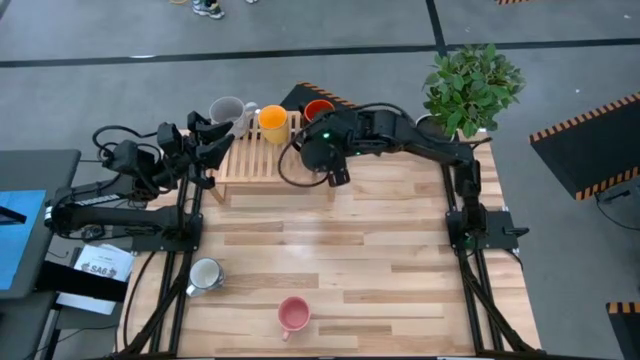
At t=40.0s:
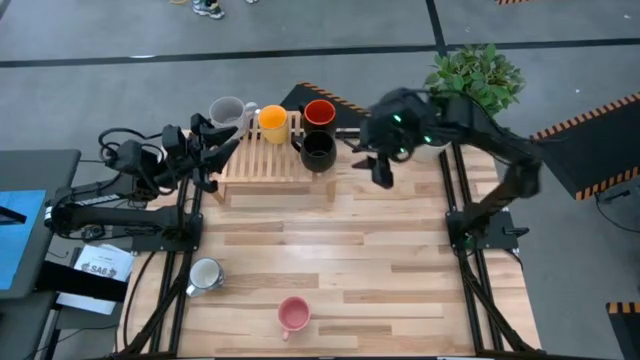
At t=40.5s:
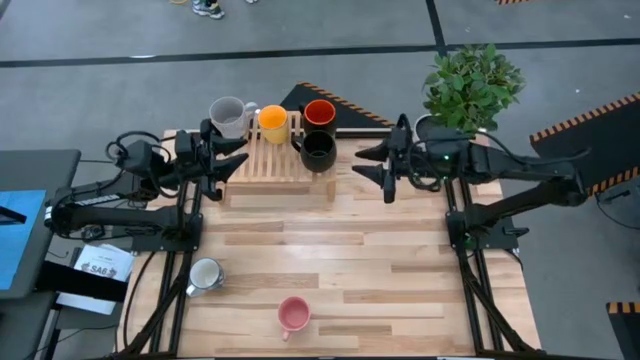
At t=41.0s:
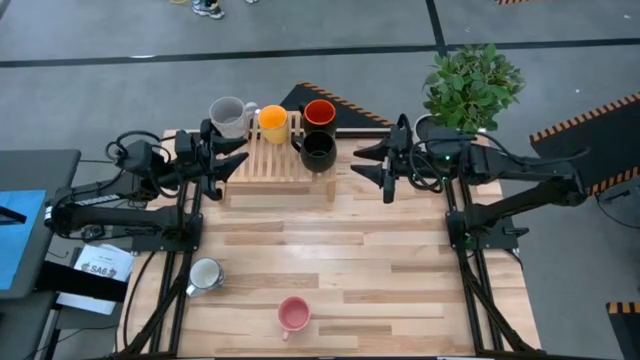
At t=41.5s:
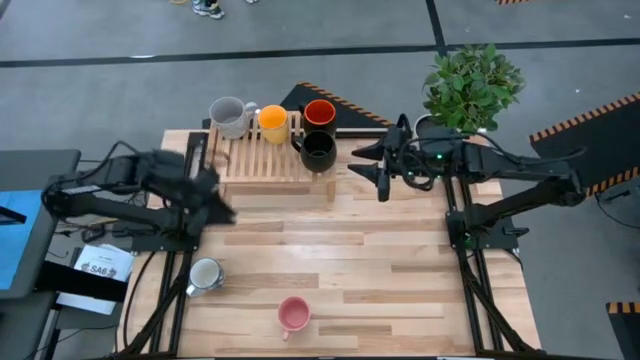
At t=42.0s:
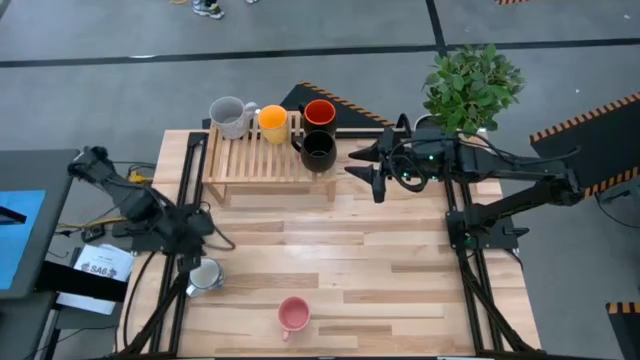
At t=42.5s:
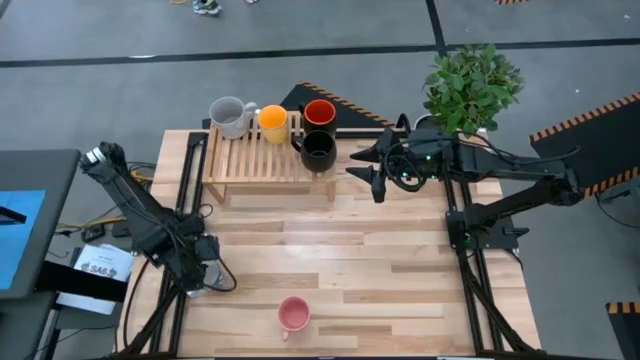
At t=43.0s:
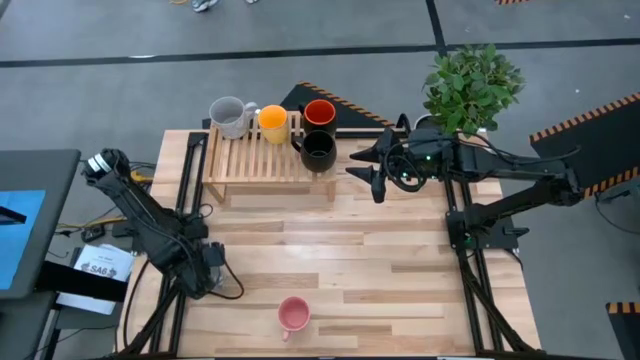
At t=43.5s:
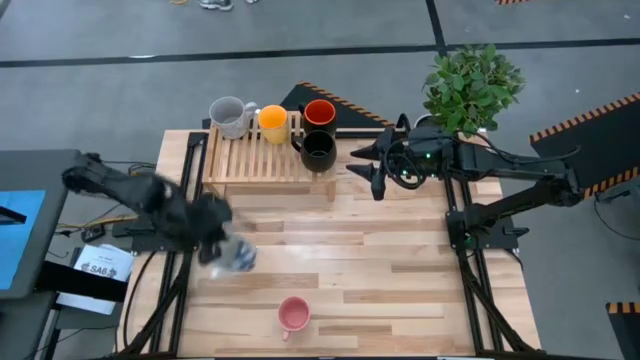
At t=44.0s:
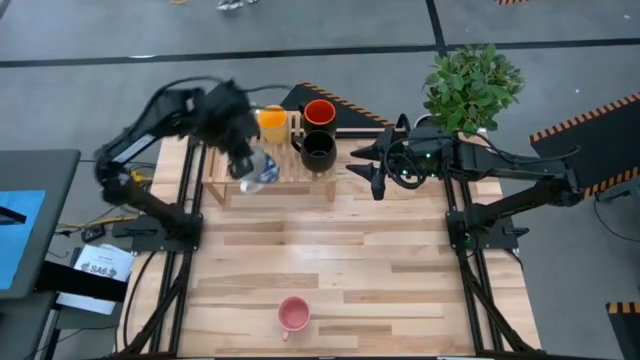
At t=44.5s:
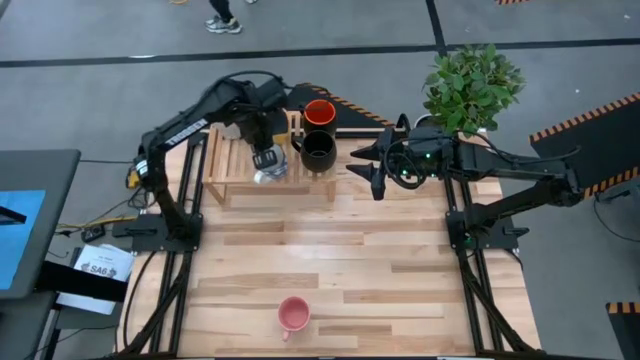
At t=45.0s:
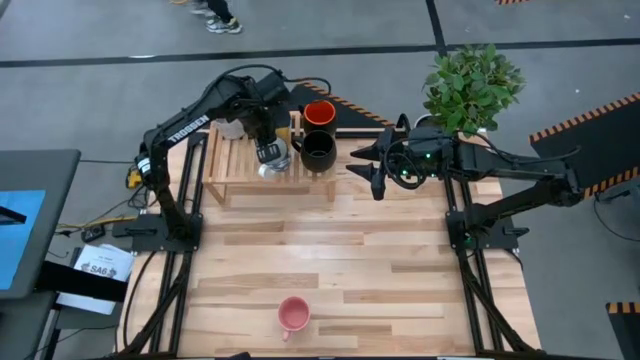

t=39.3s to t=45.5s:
Task: Place coffee mugs
Put the white mug on the shelf

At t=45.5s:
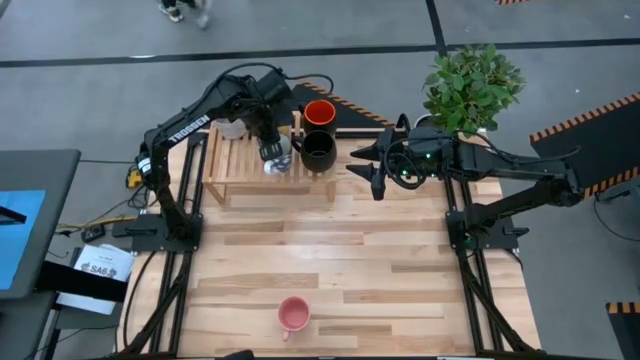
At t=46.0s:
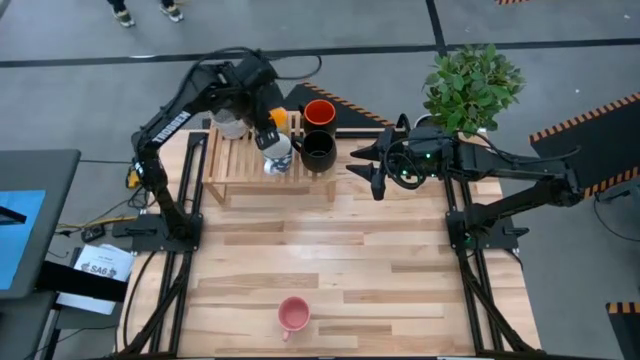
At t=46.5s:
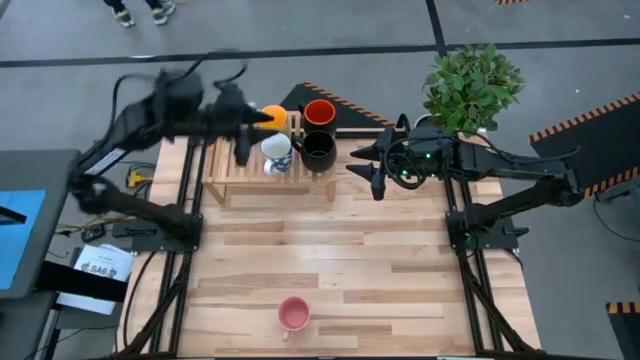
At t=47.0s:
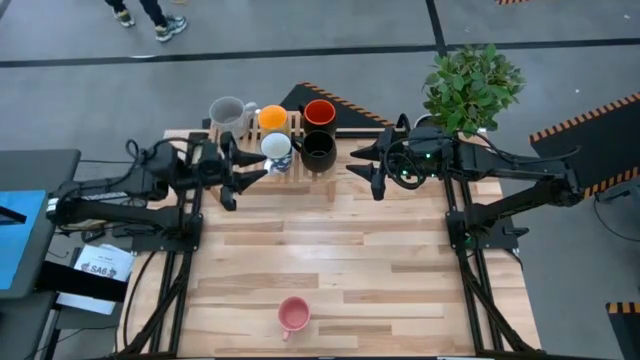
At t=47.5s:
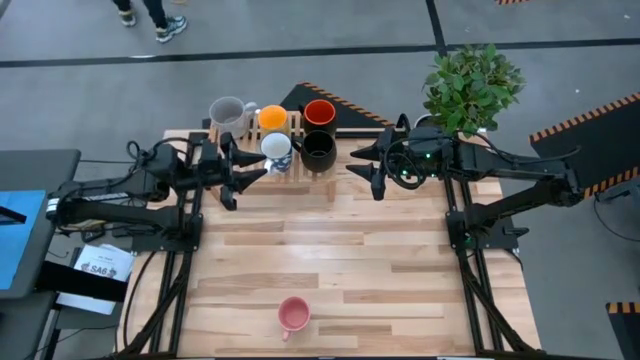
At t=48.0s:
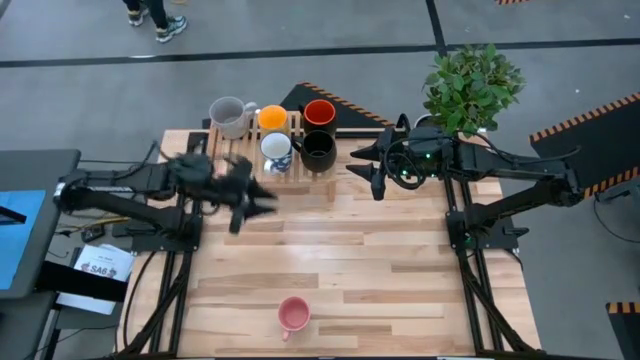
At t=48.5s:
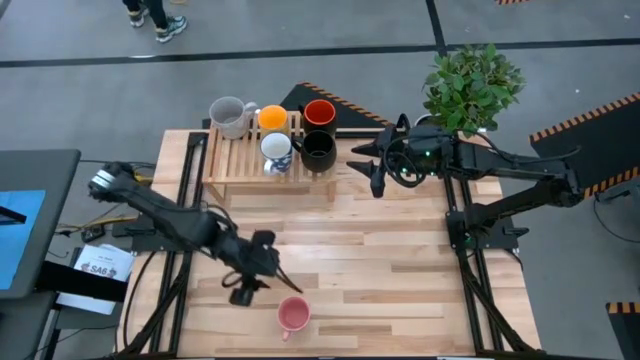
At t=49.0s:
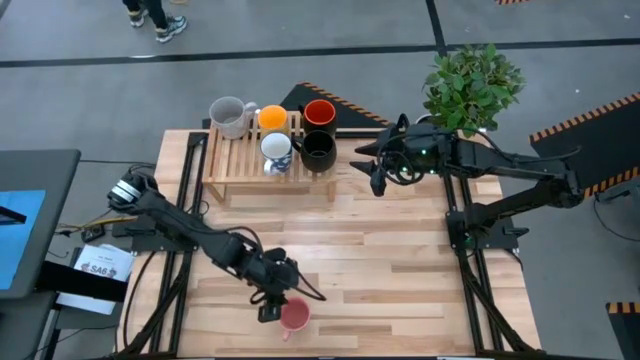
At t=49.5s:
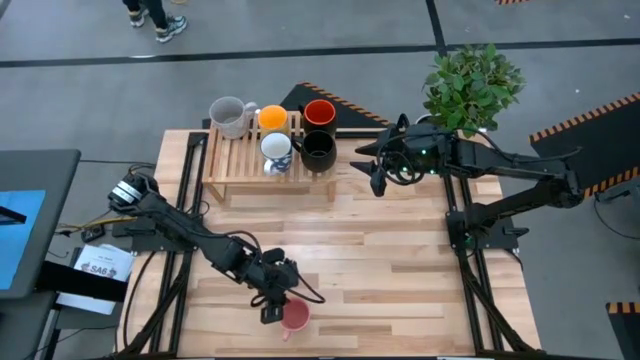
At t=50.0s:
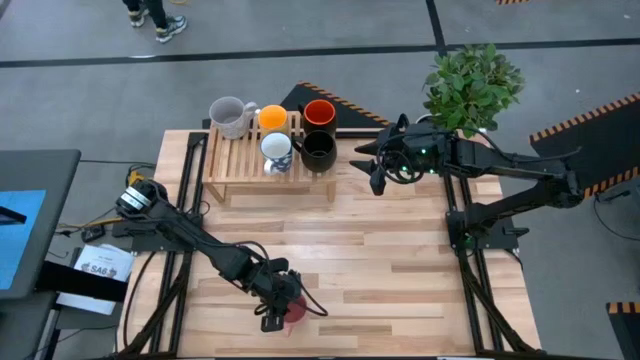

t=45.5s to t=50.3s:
Put the pink mug on the shelf

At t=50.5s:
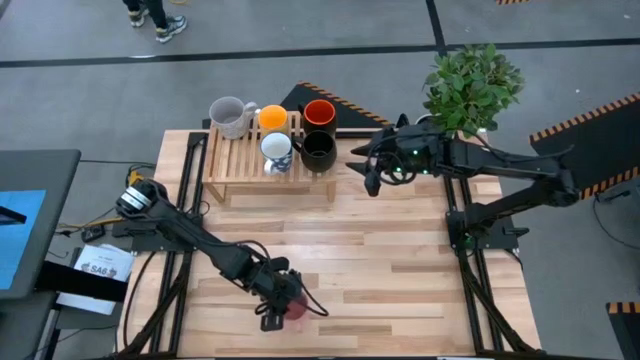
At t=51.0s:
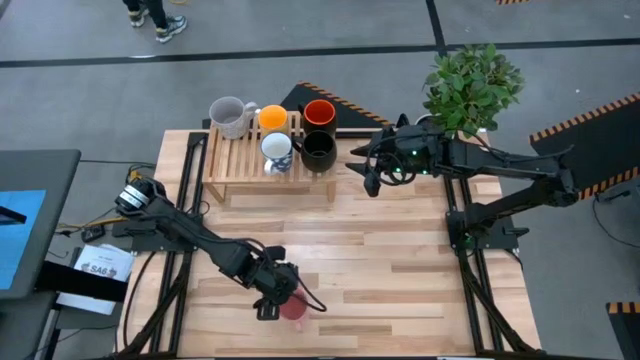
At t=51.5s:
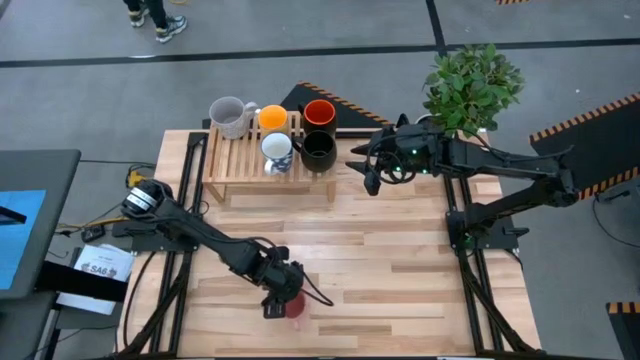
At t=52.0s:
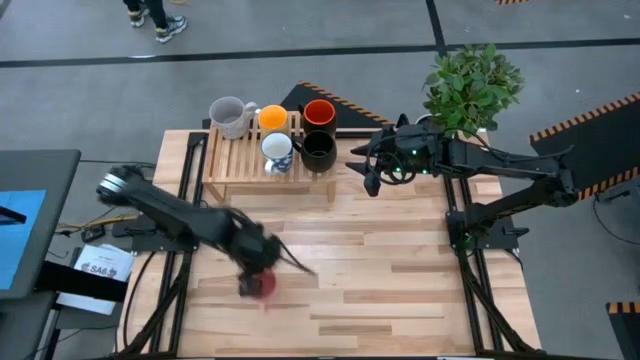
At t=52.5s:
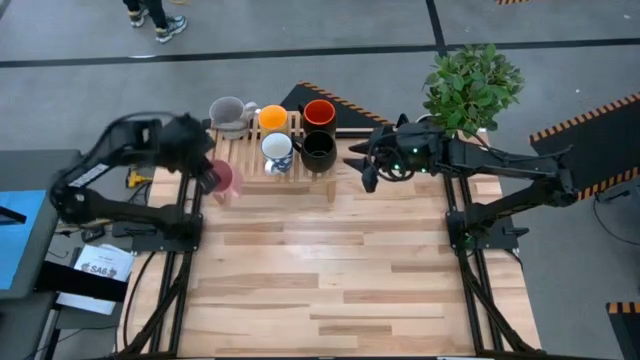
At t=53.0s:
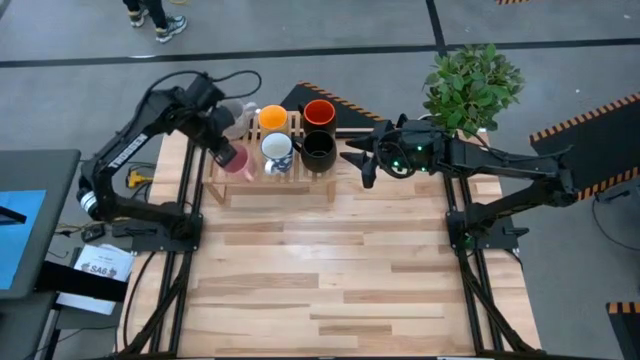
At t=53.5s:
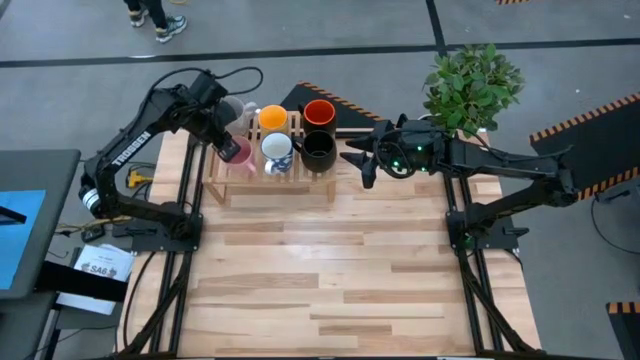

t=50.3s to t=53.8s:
Put the pink mug on the shelf

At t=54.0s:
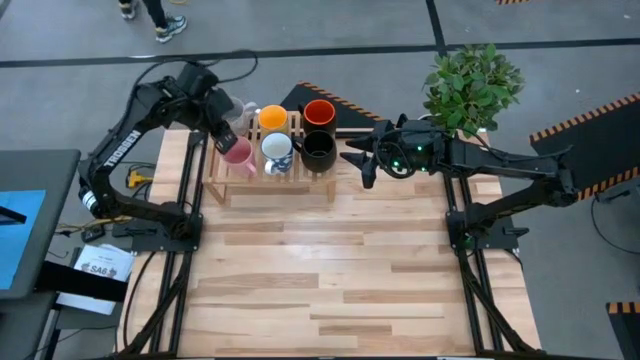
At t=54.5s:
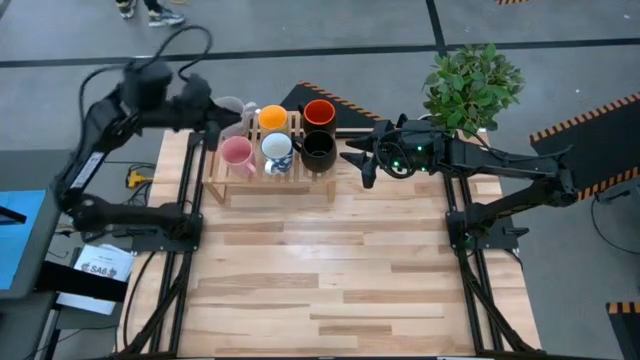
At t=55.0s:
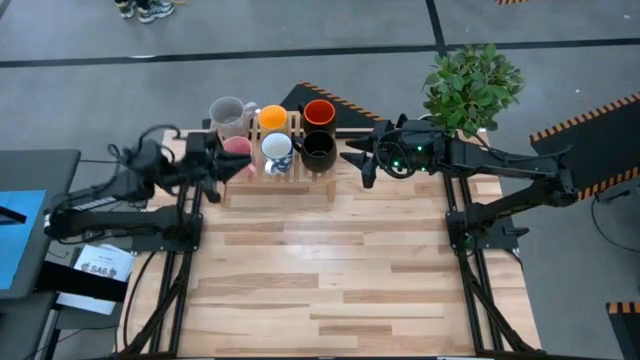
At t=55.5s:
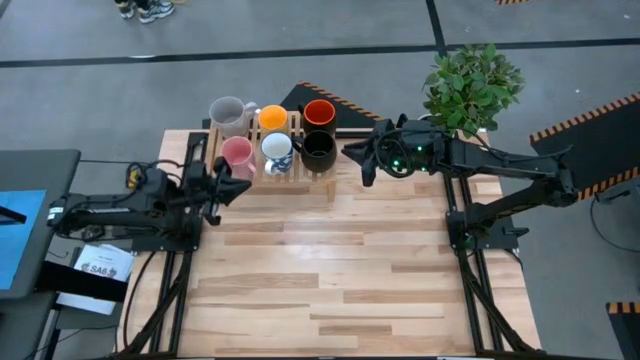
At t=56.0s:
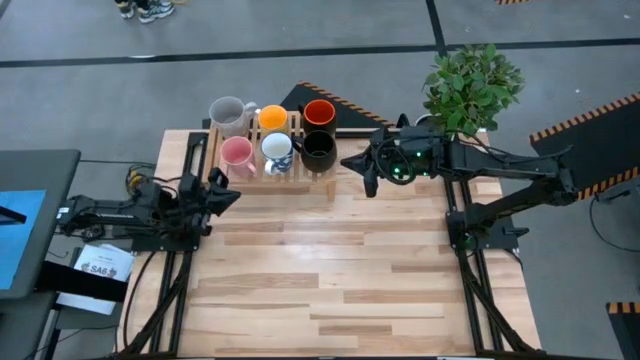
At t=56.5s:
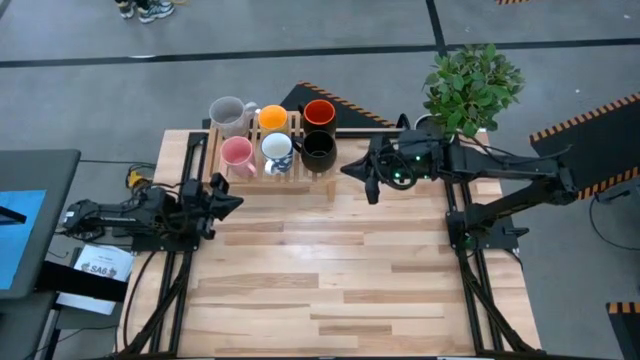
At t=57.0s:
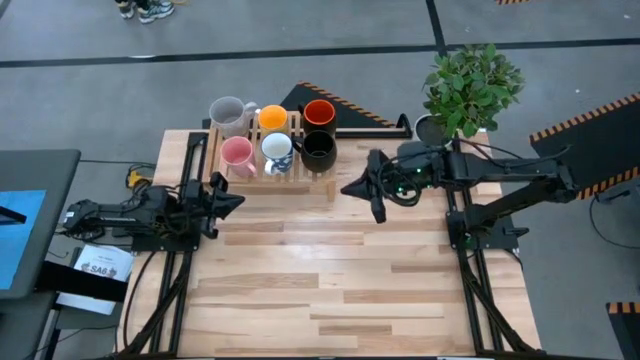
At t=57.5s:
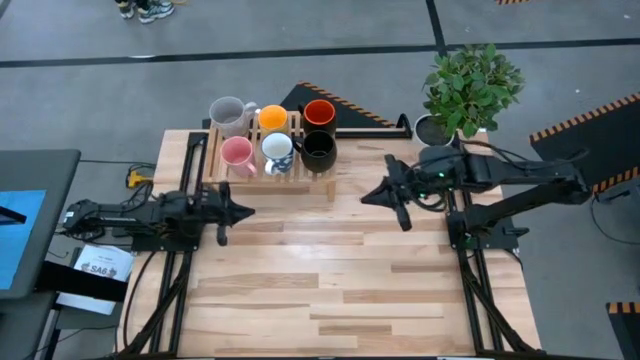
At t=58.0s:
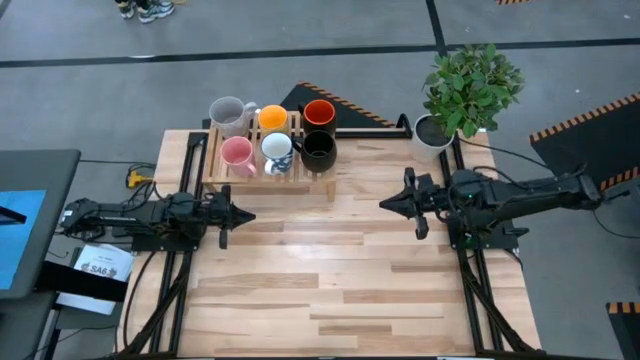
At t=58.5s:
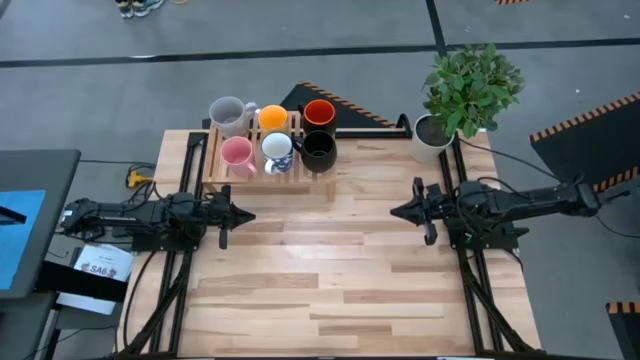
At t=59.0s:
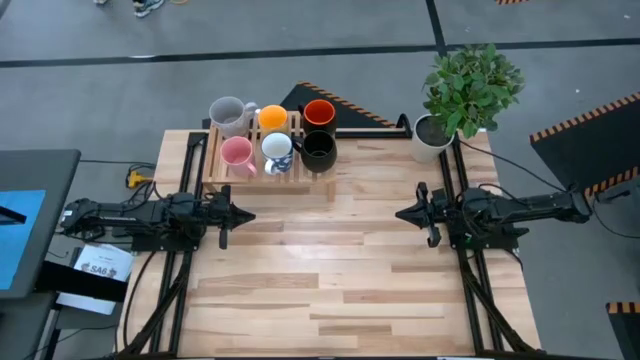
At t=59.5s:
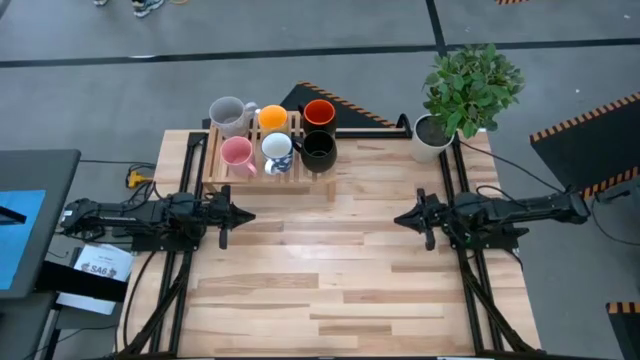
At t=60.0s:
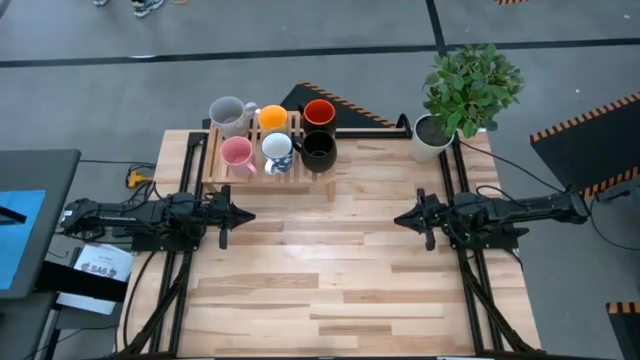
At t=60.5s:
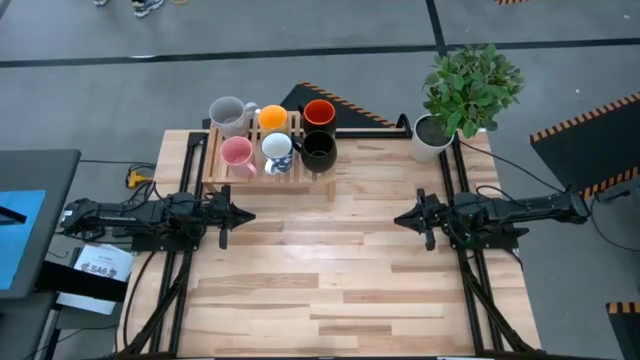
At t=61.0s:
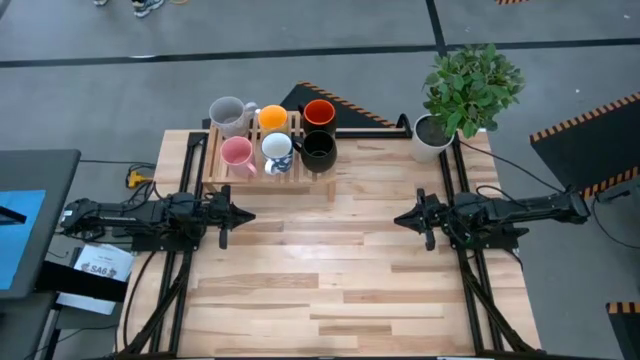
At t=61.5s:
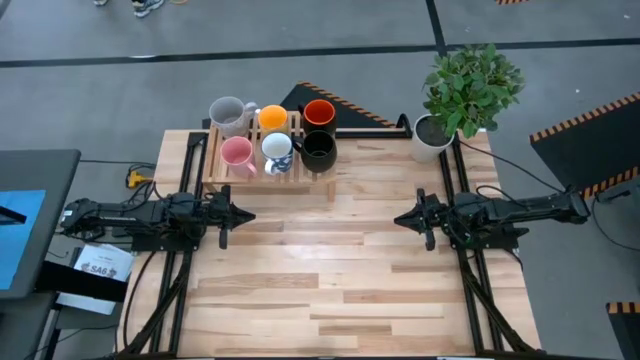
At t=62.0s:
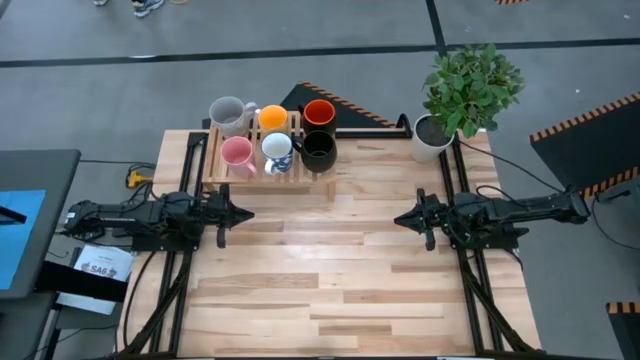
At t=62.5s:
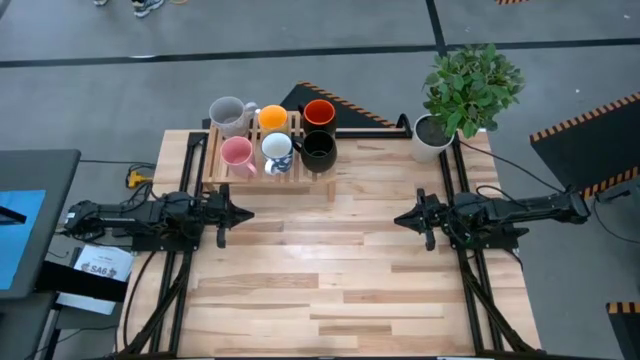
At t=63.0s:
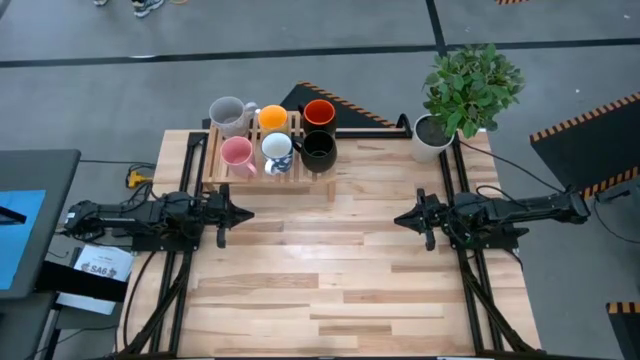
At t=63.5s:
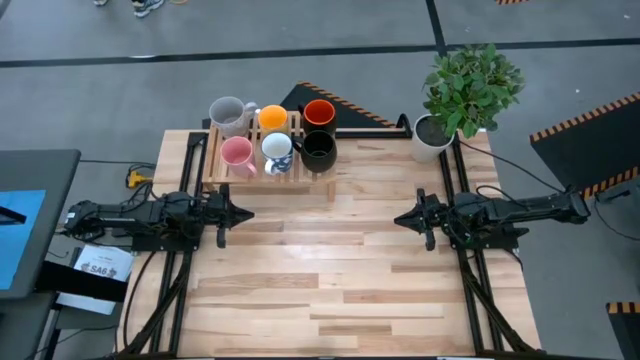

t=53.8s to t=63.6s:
Return to Home Position
